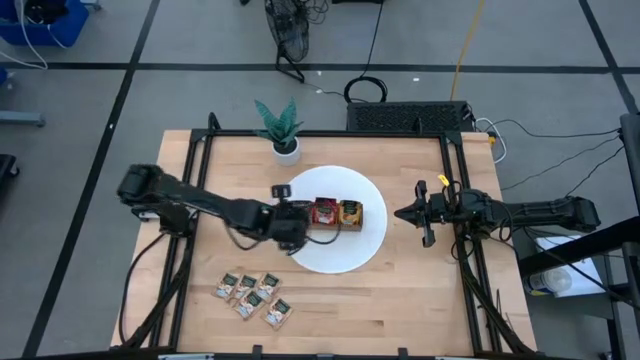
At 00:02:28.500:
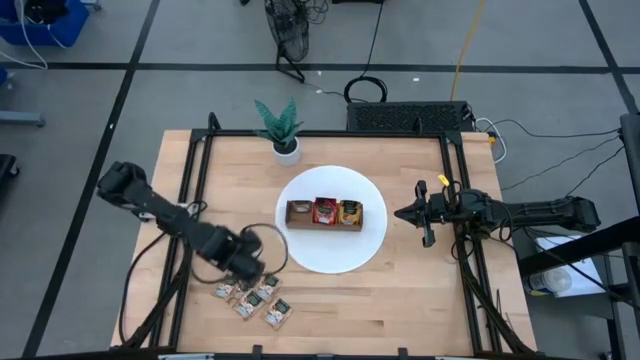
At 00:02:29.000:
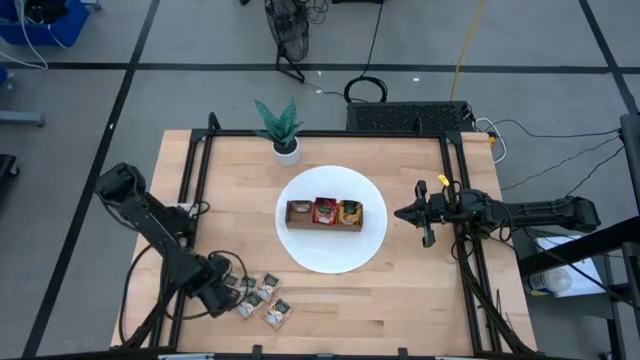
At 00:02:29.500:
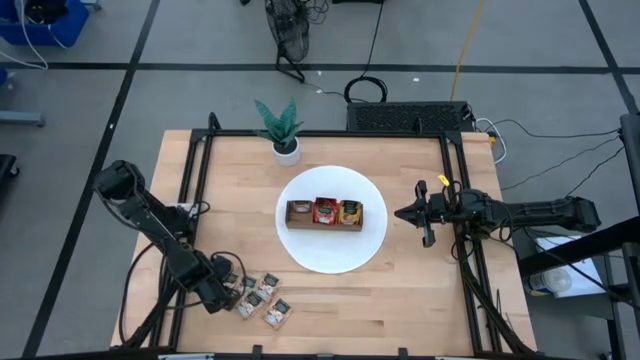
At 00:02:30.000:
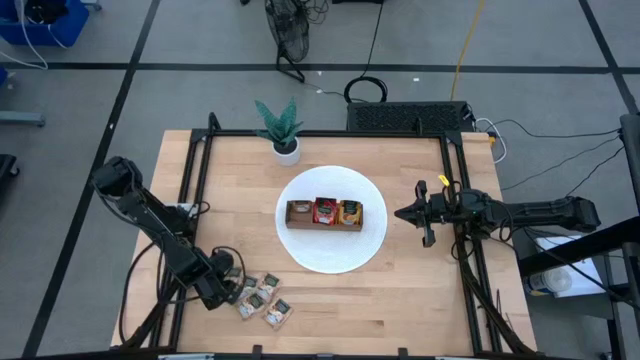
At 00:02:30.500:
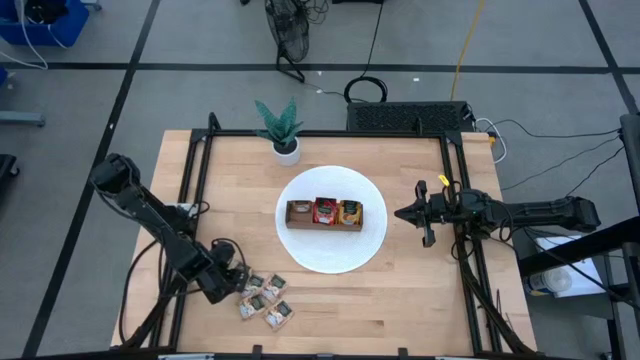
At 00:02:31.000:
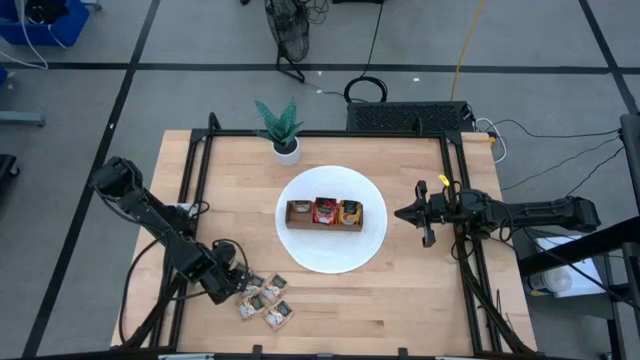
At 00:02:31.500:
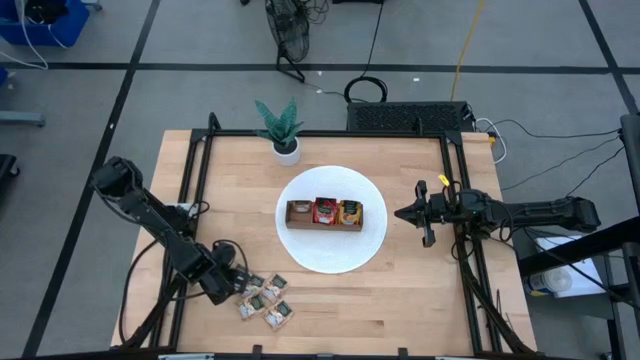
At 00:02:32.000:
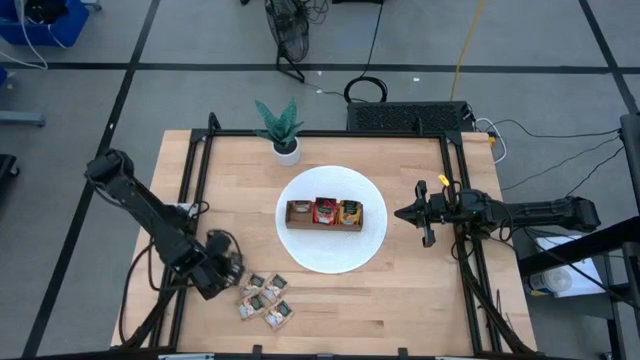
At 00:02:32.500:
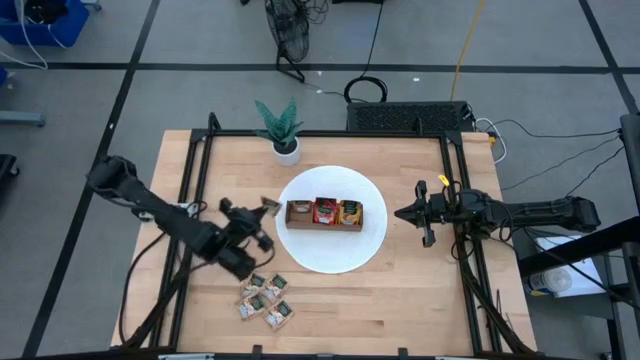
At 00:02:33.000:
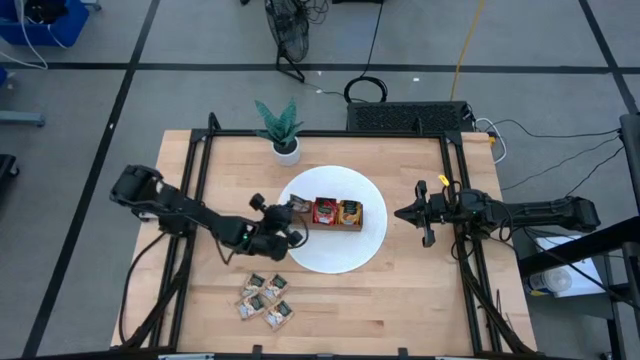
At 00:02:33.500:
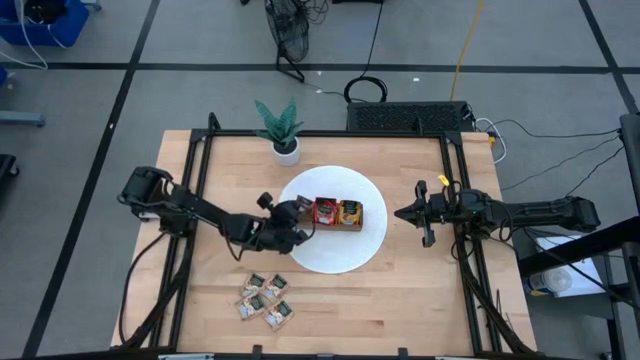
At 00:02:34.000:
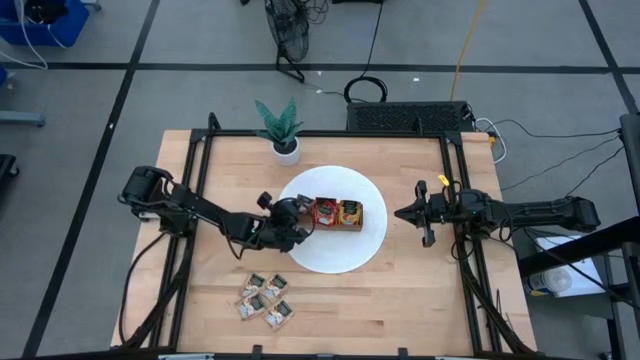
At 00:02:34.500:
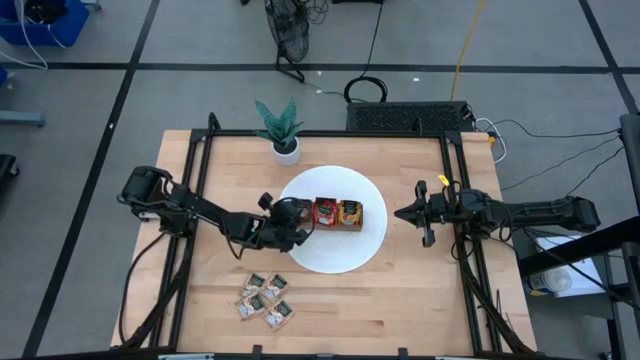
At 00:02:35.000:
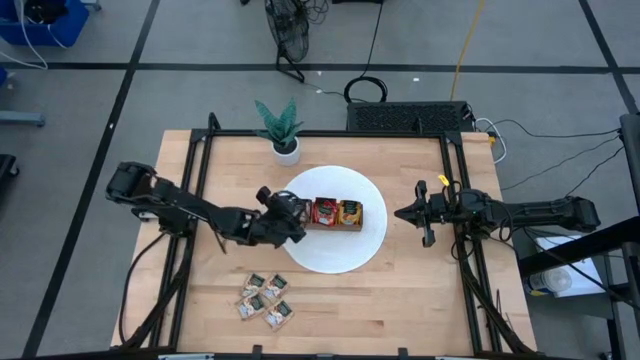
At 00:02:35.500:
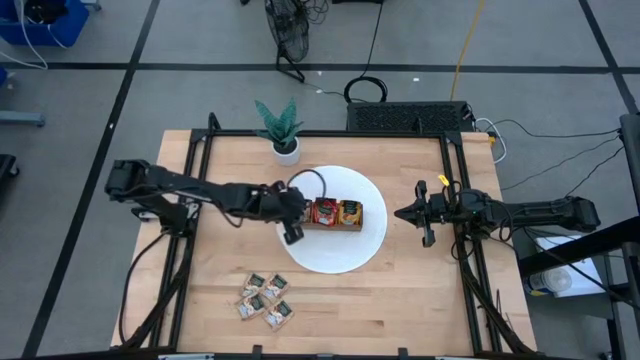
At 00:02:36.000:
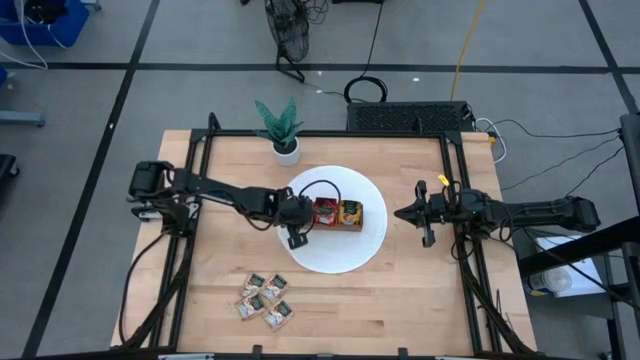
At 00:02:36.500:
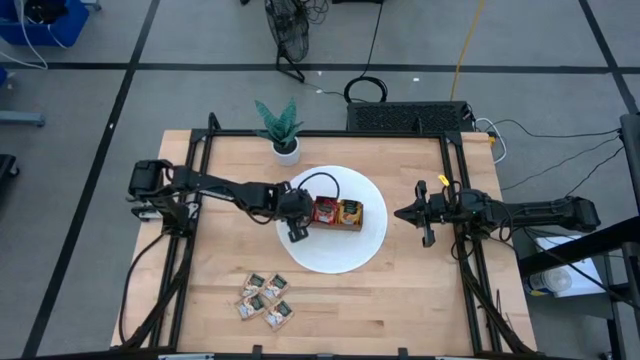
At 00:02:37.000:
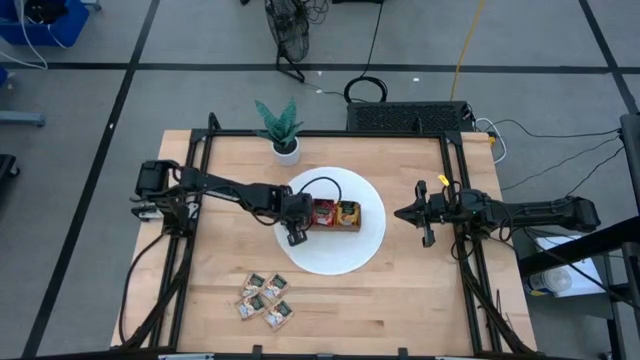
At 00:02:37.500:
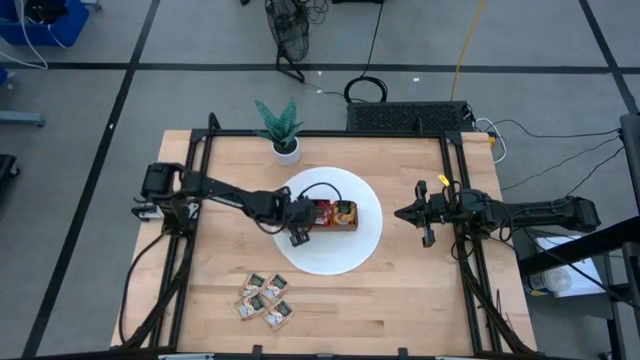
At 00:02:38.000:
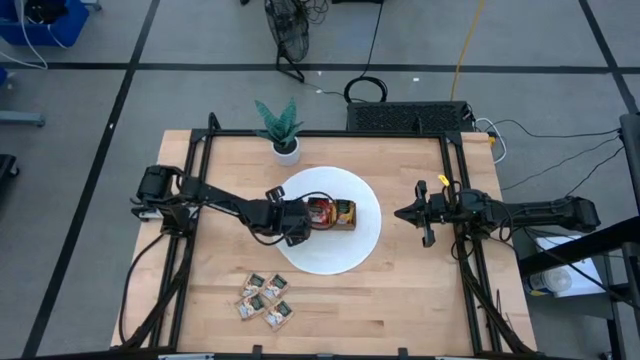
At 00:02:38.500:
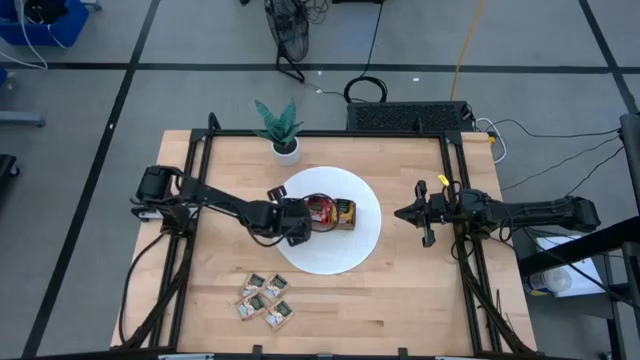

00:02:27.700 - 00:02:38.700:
Task: Pick & Place Tea
Put the brown tea bag into the left section of the wooden organizer

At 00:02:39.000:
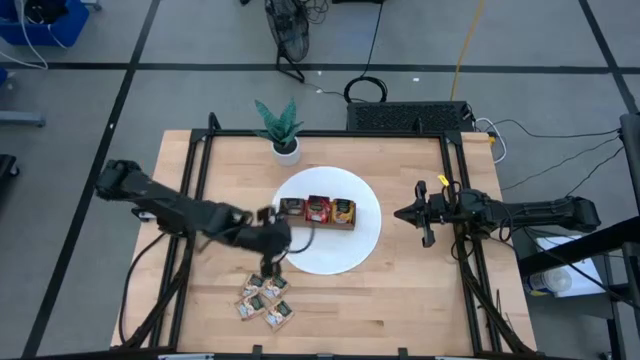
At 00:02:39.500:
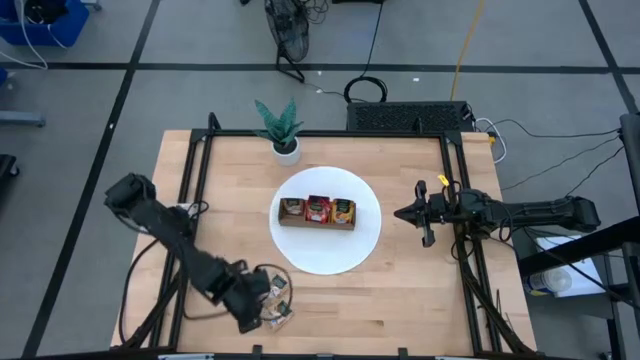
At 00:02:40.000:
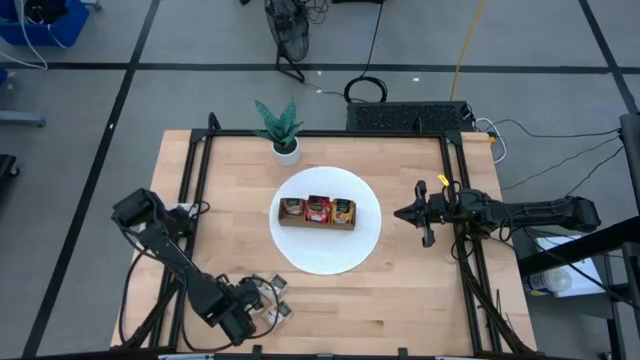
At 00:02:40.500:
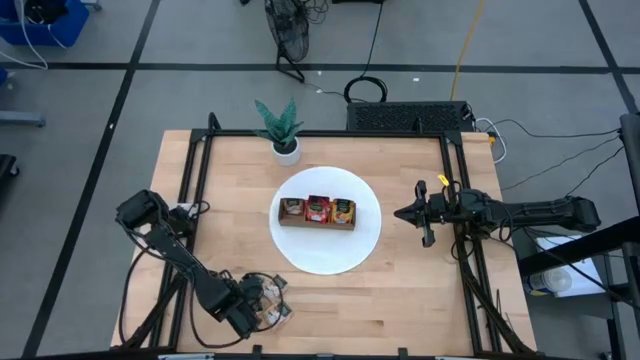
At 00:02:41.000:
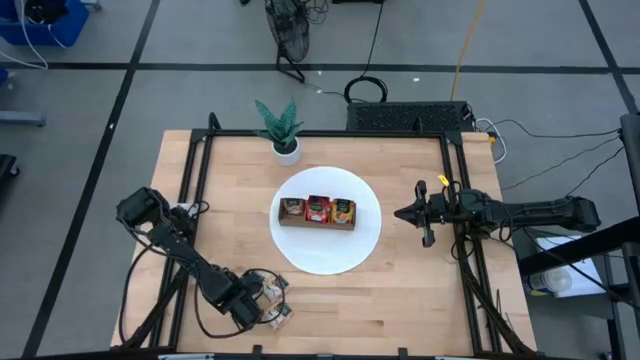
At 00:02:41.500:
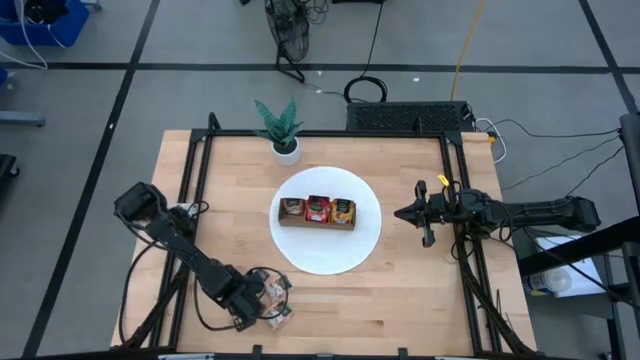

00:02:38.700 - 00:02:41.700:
Put the brown tea bag into the left section of the wooden organizer

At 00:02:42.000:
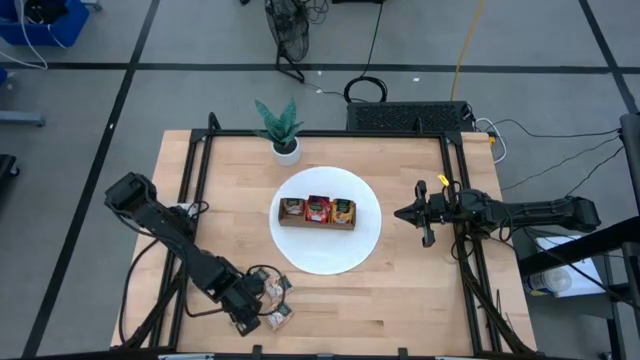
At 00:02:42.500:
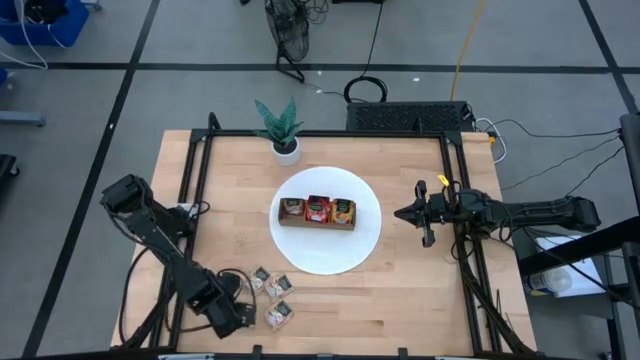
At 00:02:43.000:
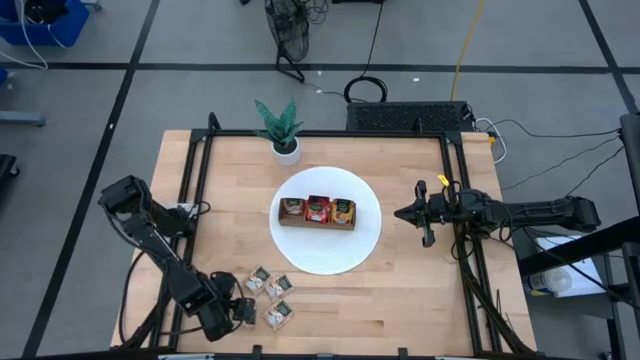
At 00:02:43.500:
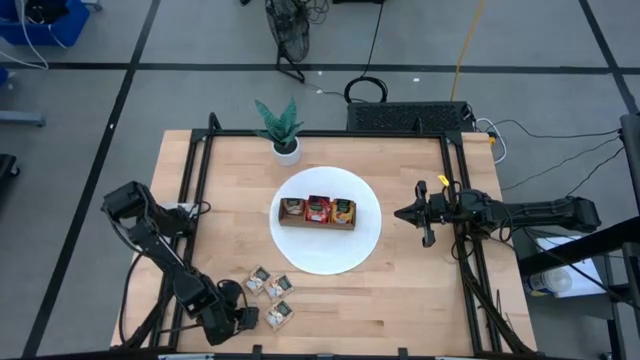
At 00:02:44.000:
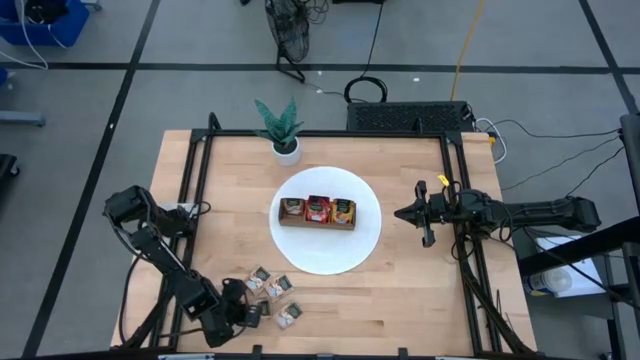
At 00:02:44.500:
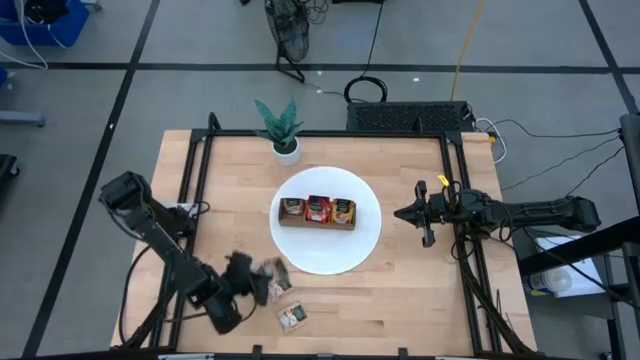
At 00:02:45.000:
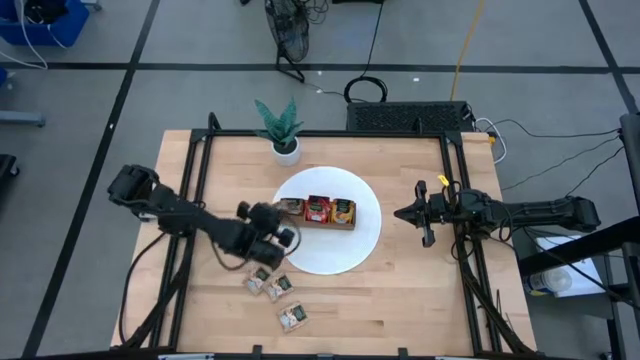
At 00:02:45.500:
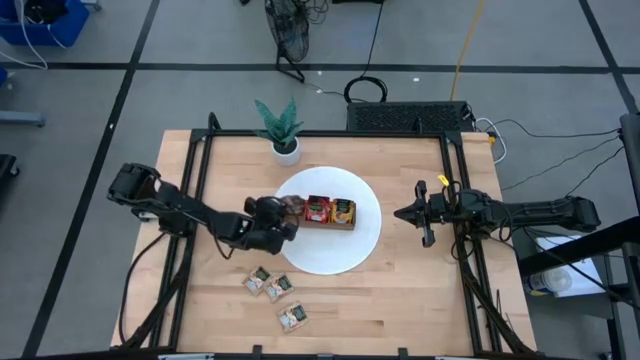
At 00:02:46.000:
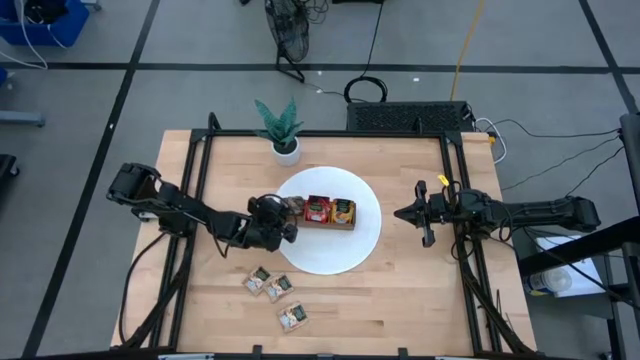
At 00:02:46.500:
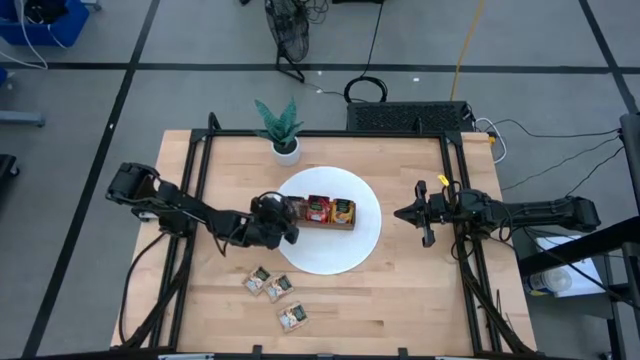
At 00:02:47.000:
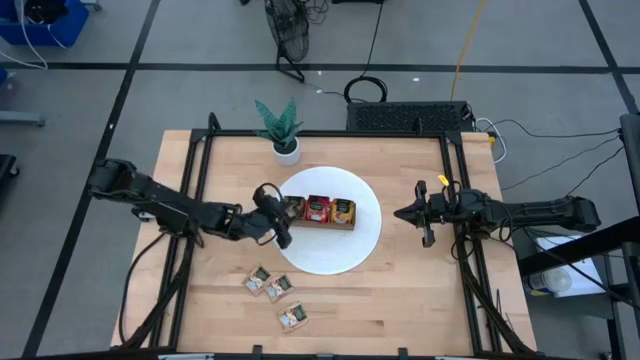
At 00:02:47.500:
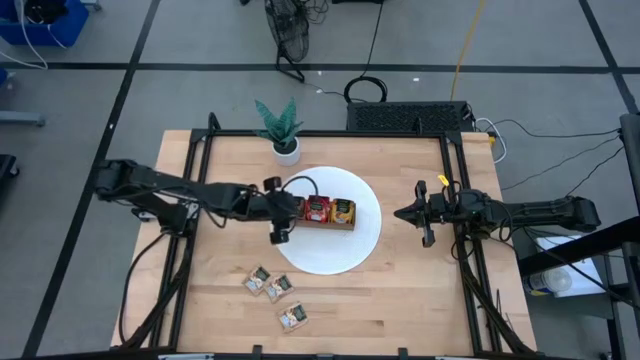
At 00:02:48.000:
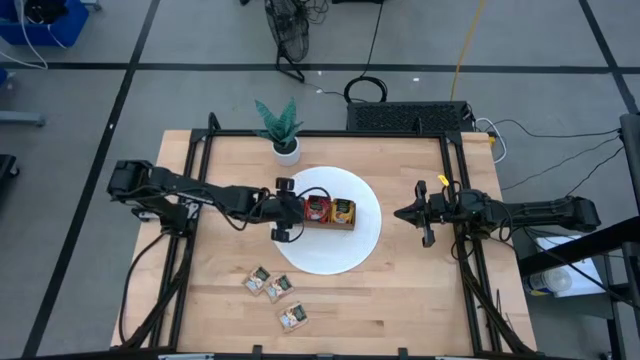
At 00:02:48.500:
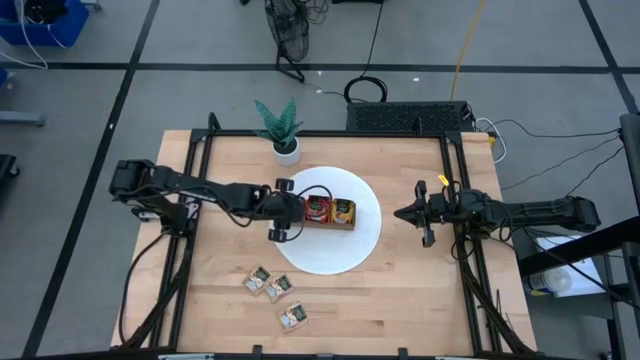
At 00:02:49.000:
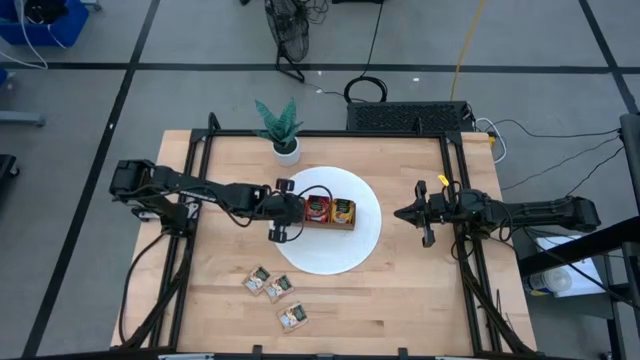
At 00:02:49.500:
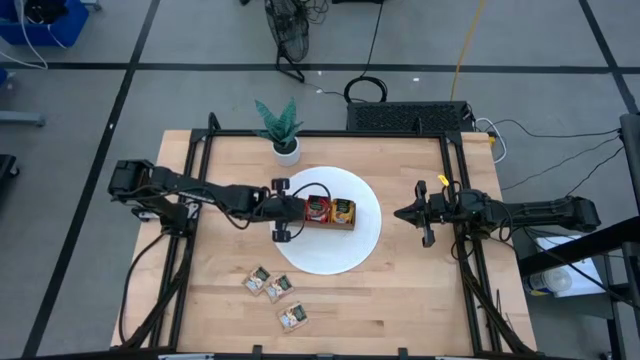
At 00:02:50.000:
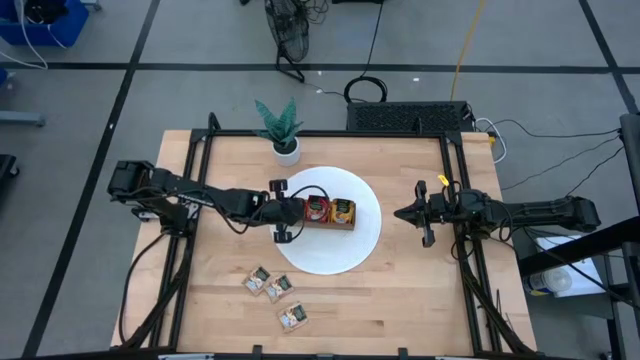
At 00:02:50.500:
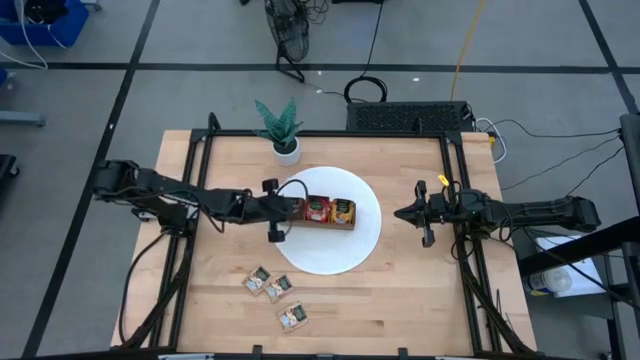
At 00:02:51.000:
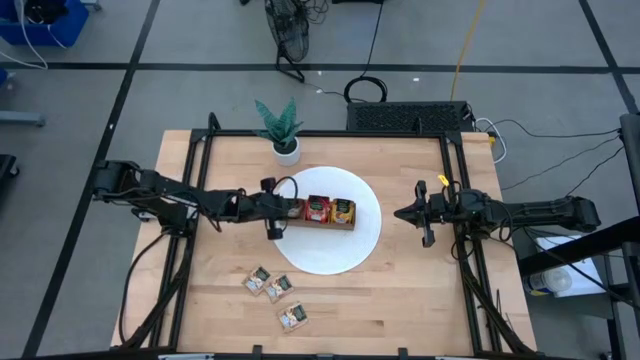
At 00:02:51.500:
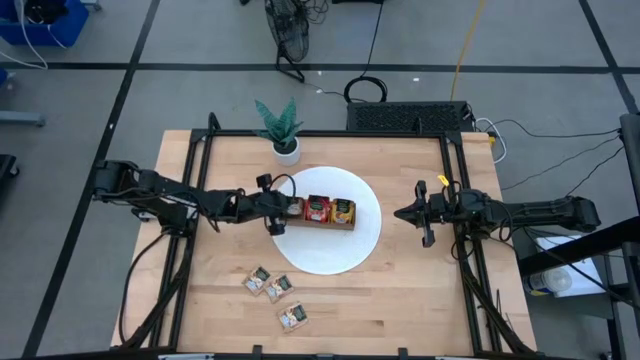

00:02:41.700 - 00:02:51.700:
Put the brown tea bag into the left section of the wooden organizer
